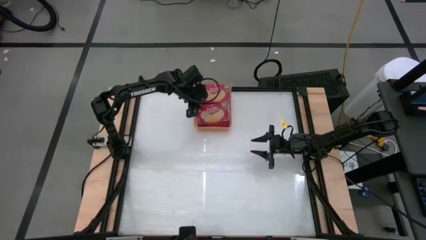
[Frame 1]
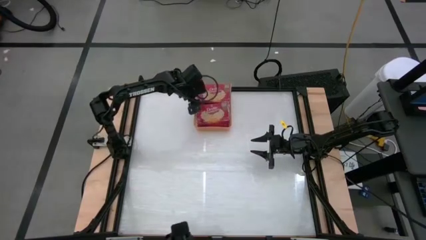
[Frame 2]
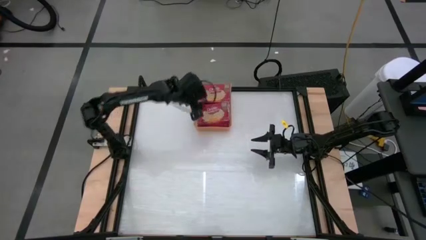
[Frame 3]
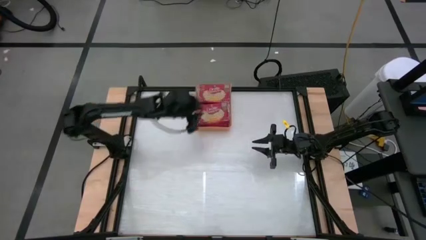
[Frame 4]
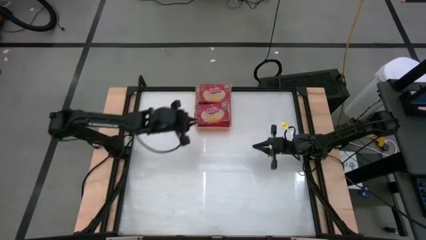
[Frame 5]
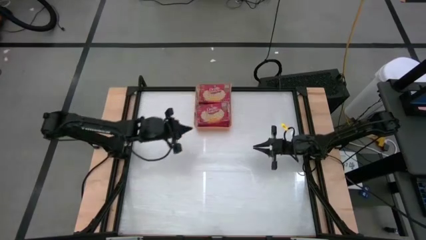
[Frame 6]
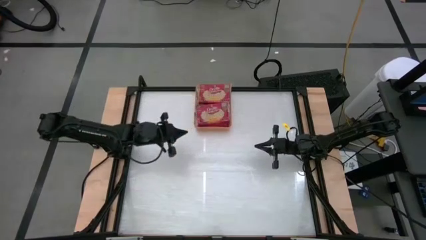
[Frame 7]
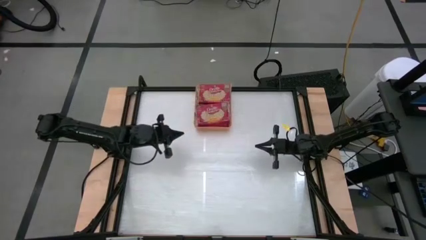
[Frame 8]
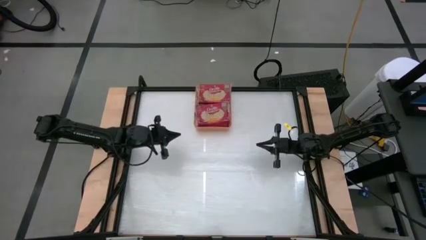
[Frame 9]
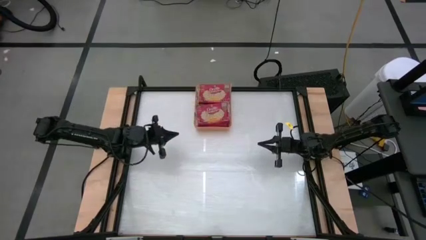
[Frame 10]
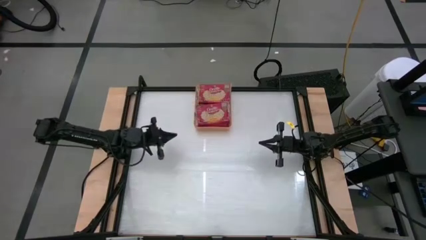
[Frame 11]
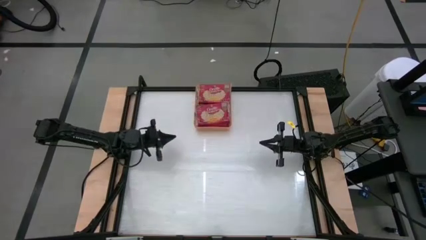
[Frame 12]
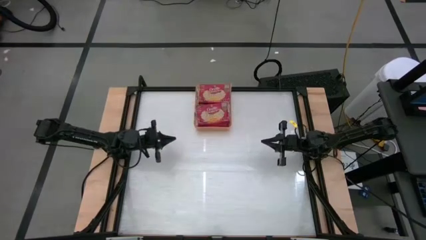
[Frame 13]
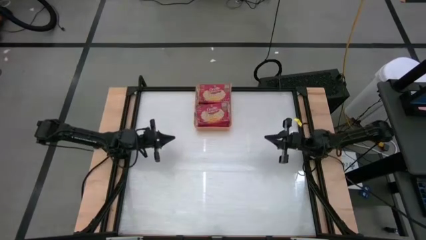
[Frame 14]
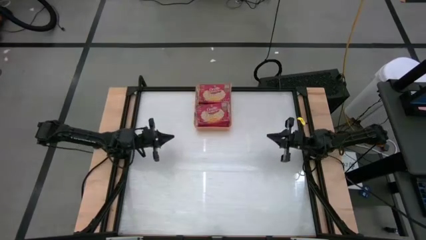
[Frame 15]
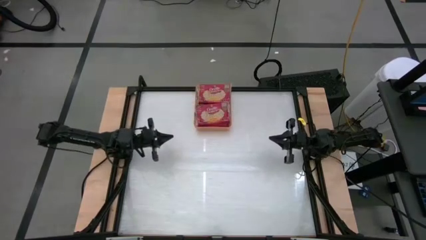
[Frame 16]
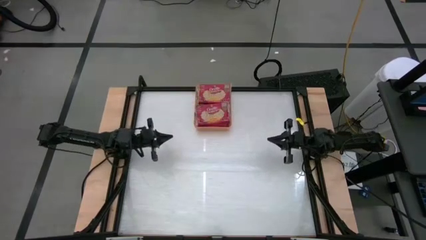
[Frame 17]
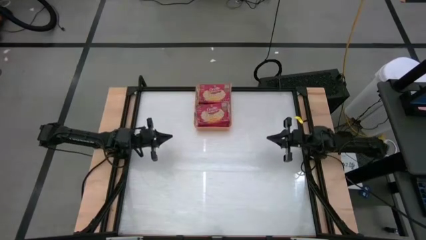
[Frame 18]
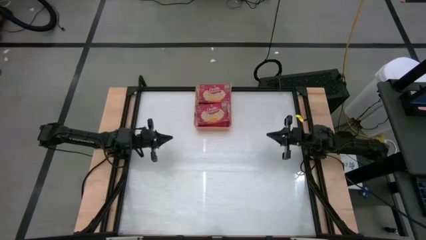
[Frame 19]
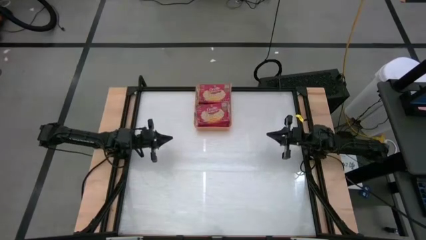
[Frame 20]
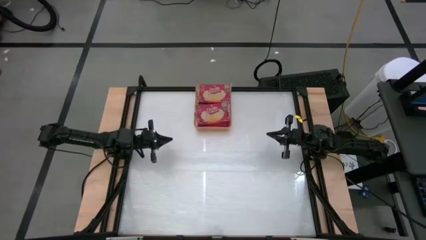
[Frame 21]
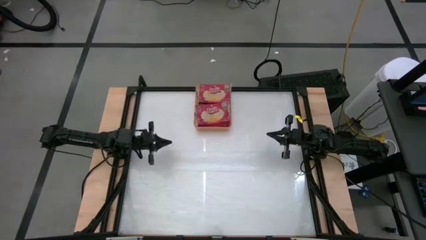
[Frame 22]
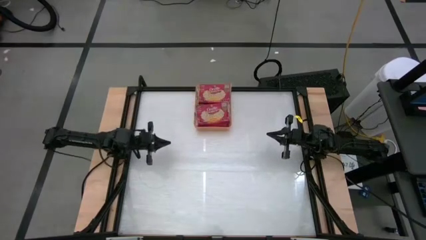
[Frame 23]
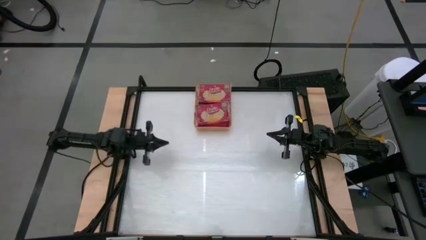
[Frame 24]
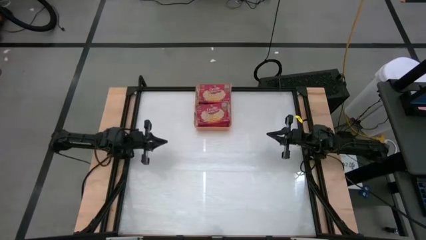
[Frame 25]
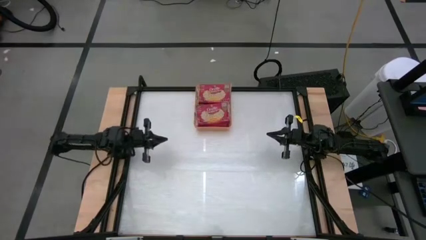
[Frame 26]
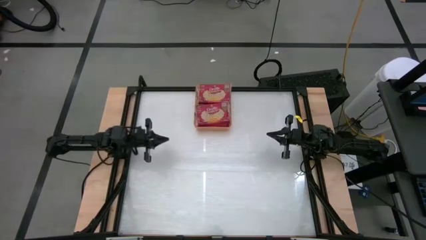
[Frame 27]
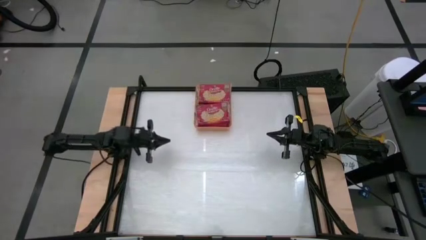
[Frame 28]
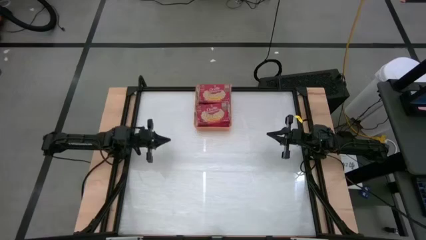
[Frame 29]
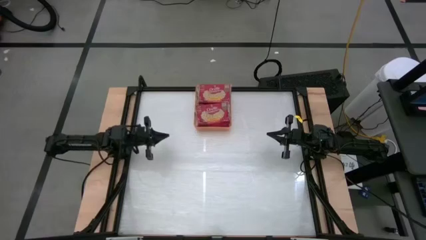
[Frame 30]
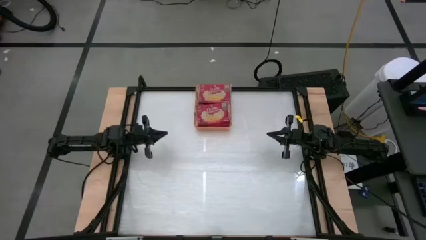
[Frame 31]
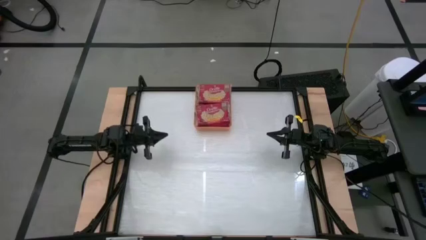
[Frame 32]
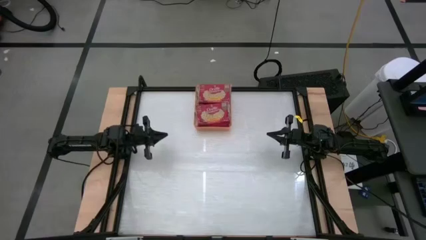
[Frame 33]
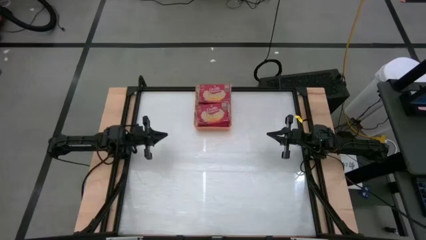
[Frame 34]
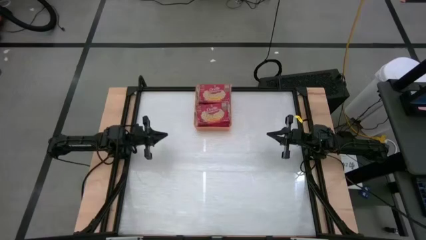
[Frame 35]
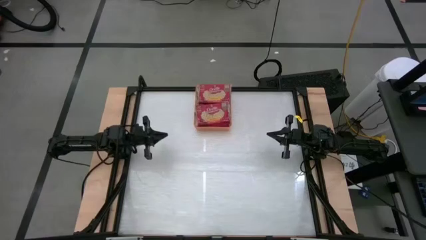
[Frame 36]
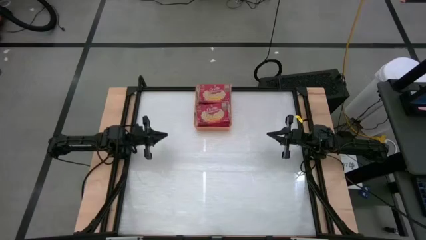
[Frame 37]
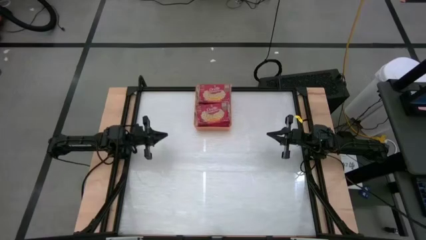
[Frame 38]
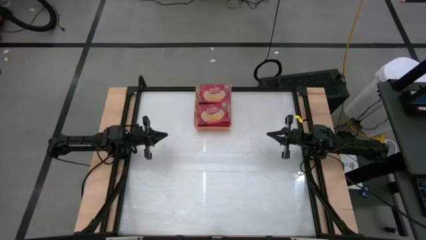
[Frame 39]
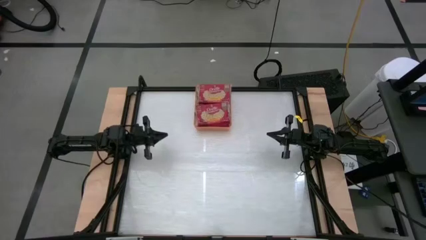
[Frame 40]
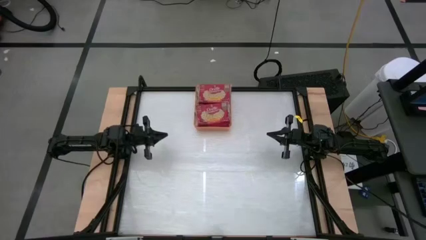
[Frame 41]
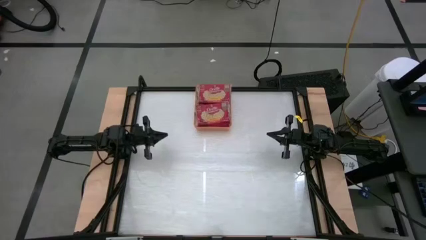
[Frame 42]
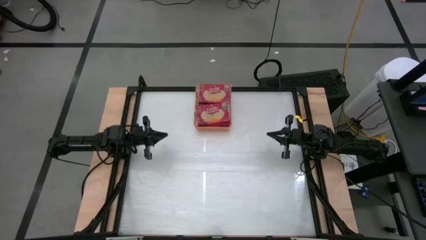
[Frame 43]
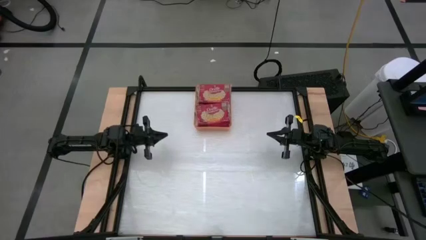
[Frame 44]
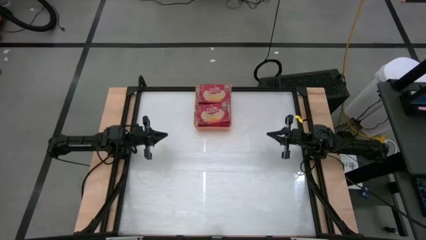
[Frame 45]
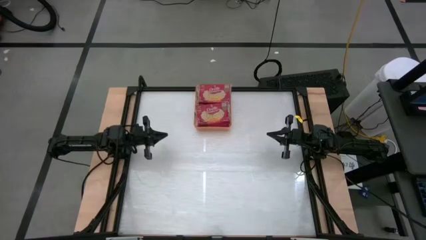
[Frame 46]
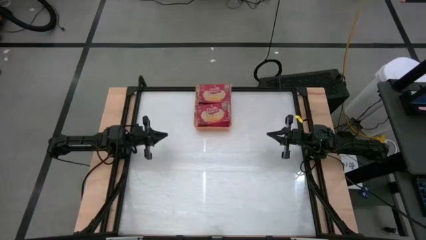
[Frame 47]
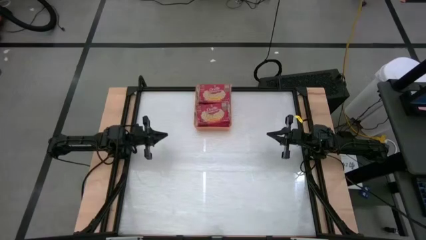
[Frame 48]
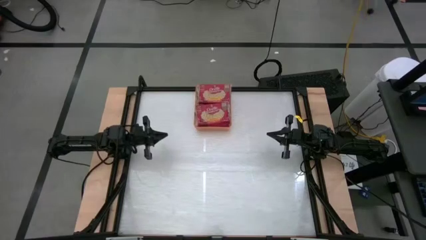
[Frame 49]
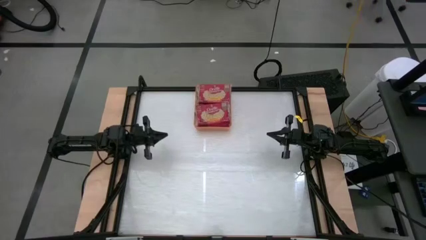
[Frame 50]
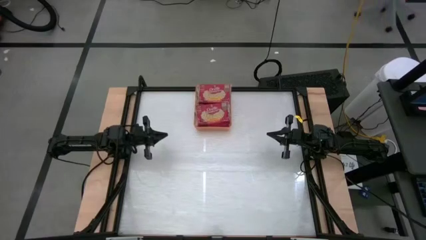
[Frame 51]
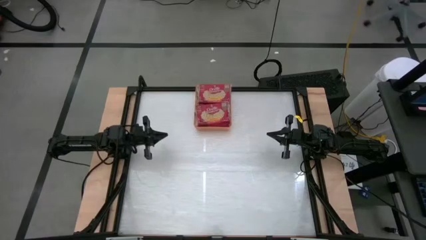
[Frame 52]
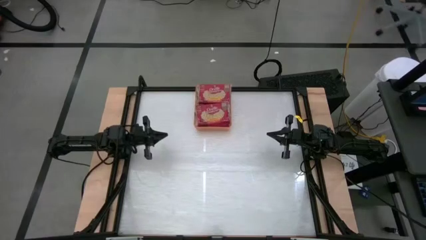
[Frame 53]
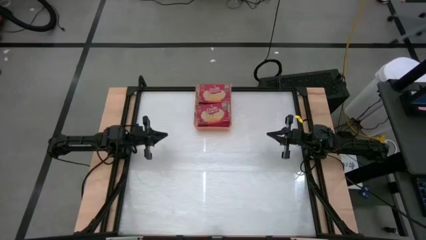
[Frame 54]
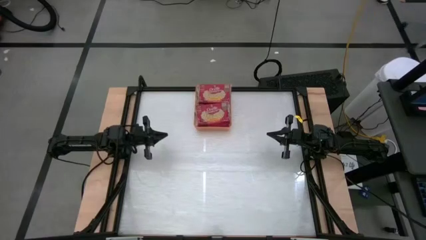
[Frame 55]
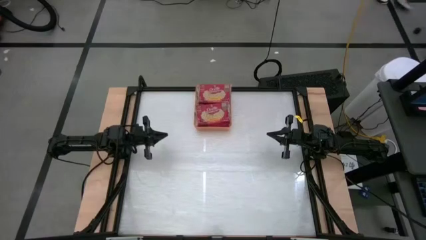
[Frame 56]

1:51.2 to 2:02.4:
Task: Sort popcorn bags into baskets
Return to Home Position

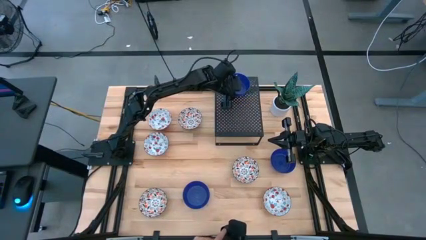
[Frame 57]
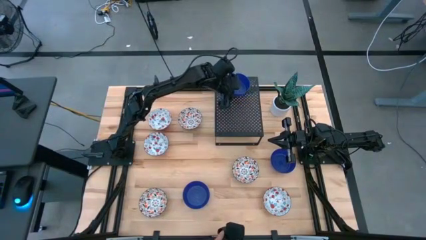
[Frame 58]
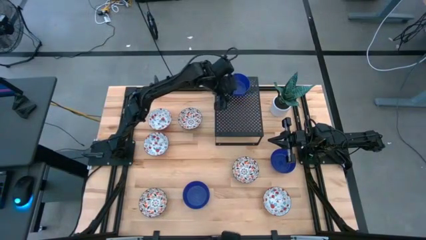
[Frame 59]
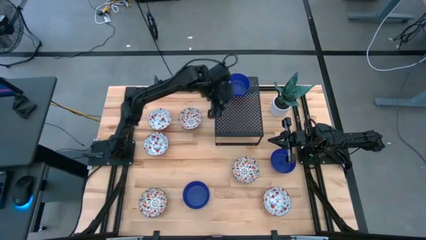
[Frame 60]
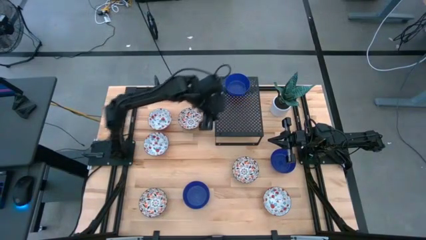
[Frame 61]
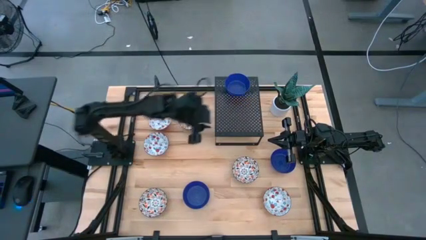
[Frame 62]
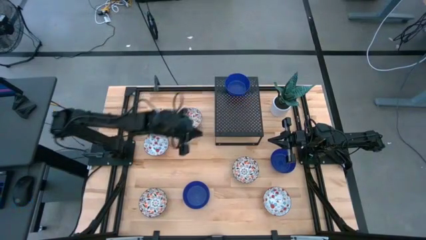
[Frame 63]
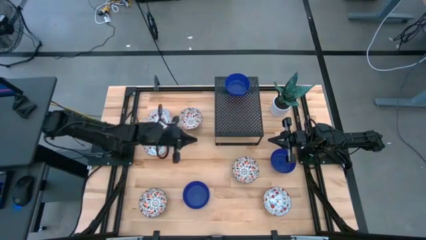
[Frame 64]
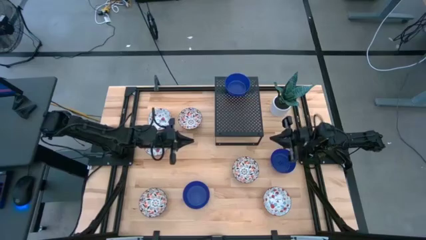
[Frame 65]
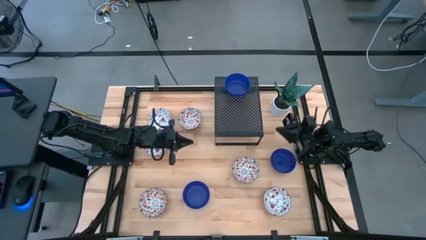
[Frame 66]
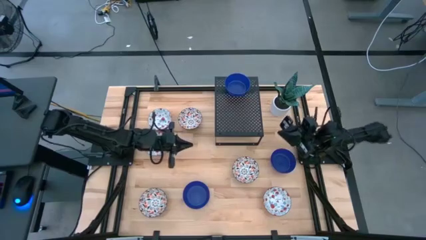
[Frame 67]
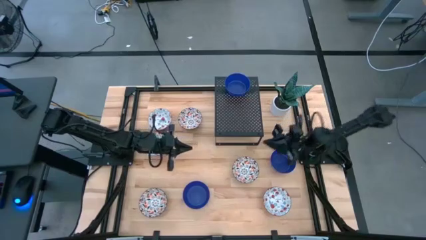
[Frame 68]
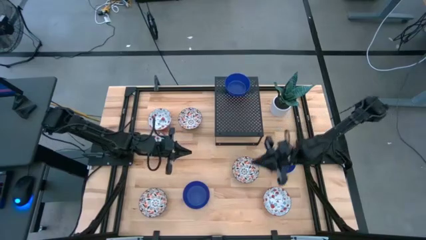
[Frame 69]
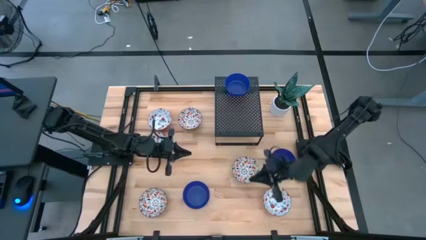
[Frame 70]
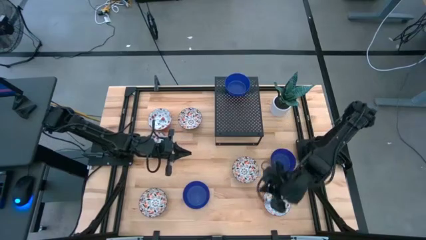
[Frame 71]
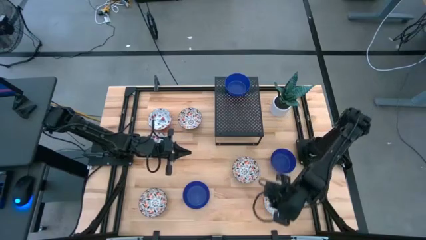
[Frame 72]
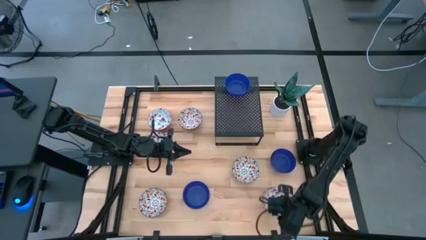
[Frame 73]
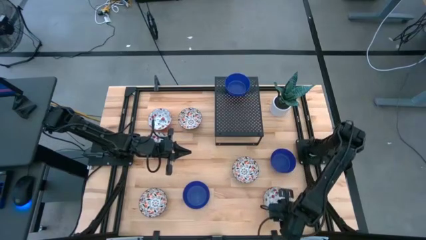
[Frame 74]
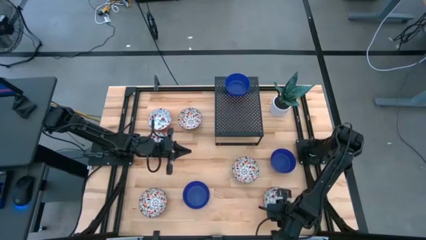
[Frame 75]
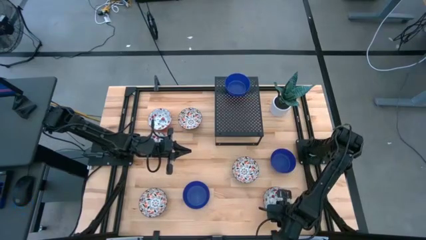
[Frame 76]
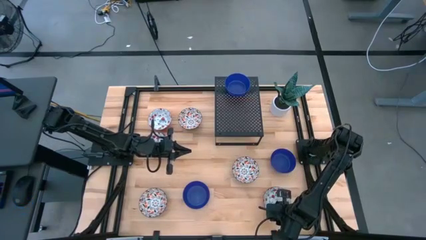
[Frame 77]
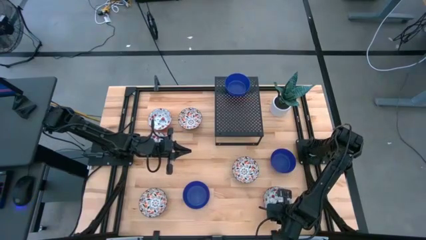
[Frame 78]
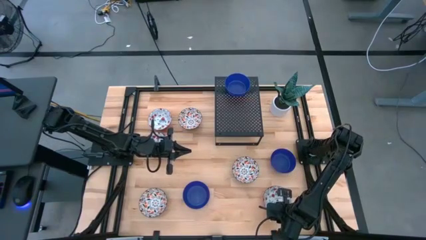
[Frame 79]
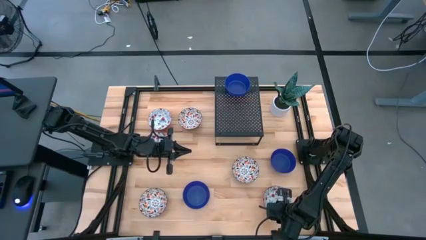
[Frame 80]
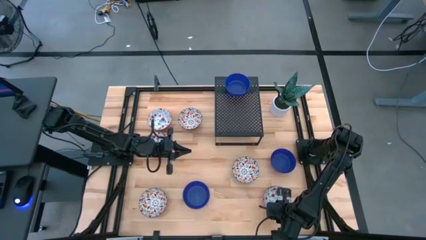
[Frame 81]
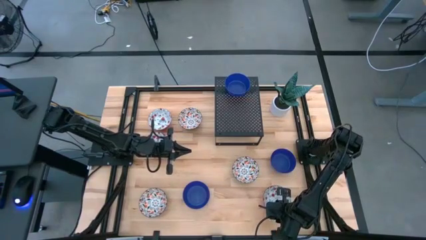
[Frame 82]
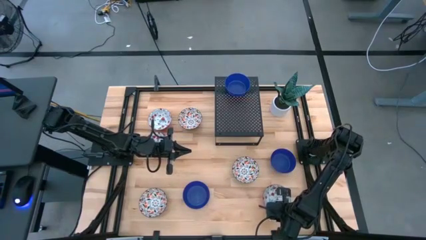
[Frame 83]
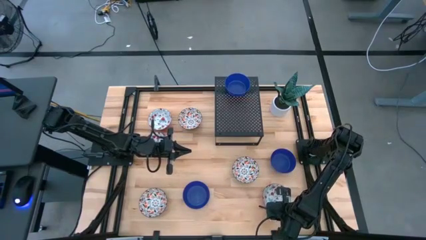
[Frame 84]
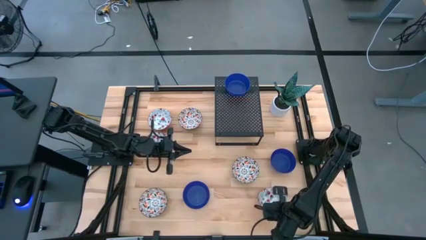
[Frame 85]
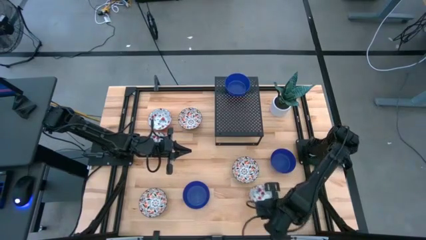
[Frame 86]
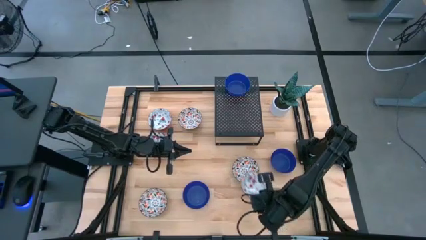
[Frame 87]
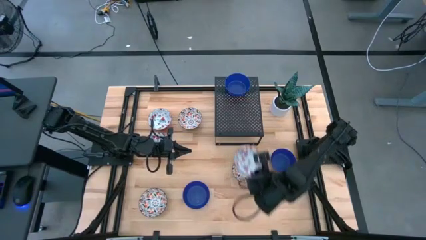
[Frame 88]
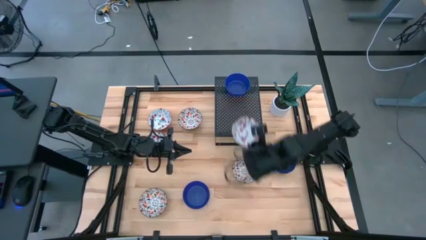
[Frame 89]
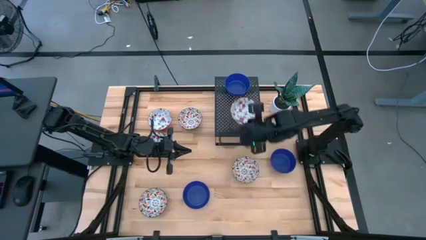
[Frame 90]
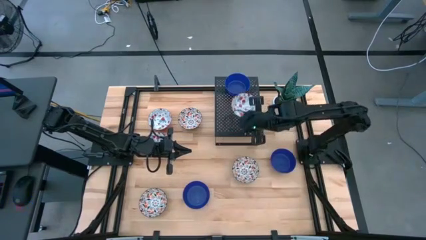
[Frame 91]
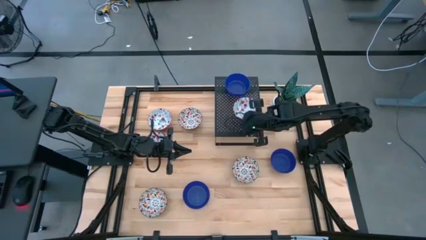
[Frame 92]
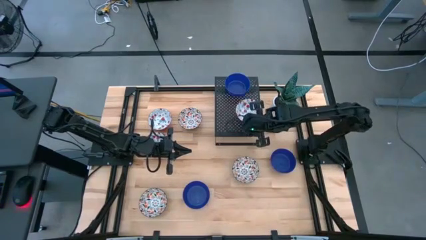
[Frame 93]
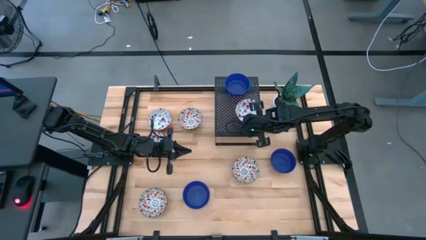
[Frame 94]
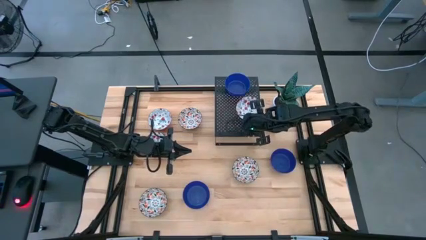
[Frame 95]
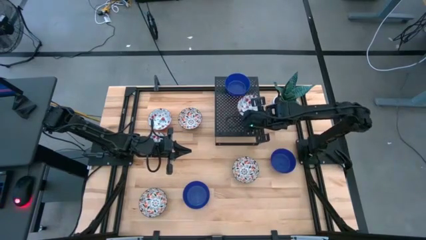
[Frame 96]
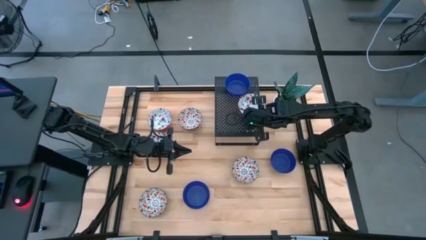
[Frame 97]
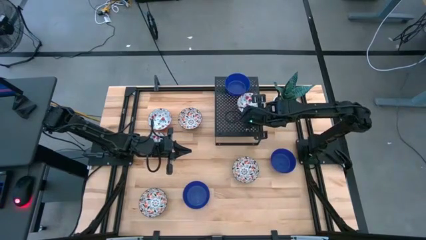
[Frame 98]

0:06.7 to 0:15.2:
Task: Pick & Place Mini bowls
Put the bottom red and white bowl on the shelf
